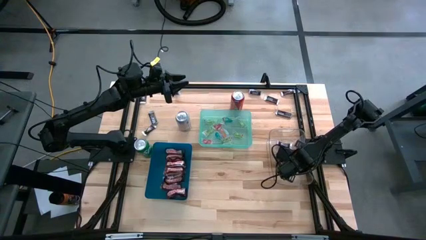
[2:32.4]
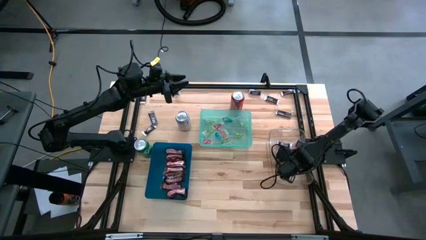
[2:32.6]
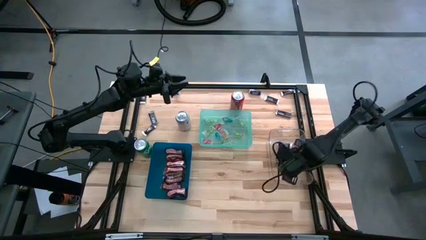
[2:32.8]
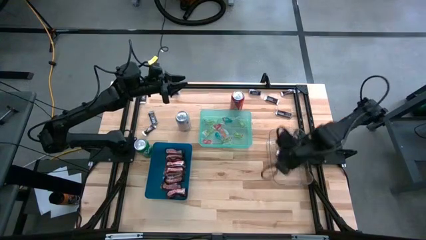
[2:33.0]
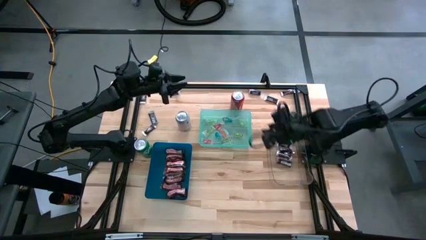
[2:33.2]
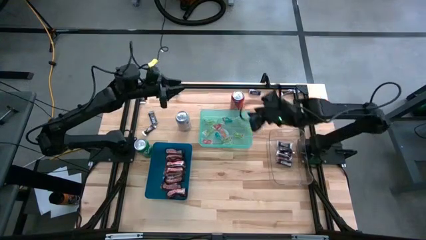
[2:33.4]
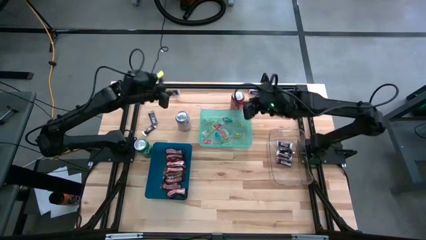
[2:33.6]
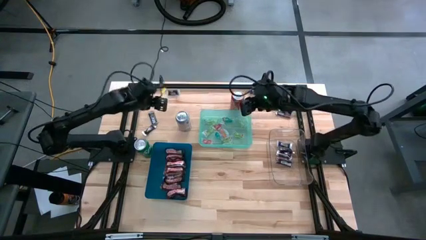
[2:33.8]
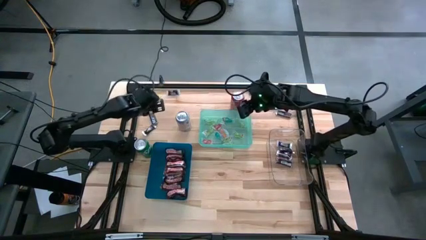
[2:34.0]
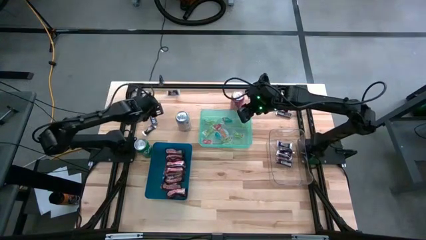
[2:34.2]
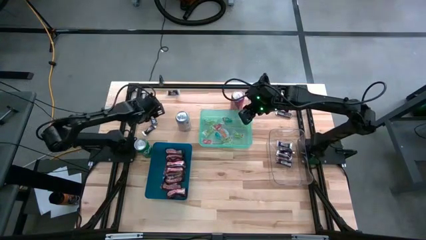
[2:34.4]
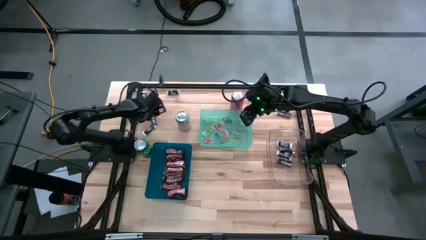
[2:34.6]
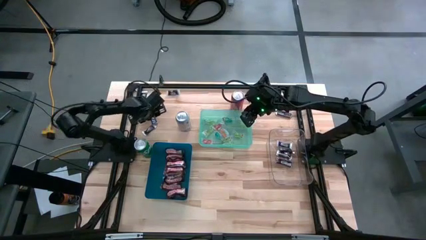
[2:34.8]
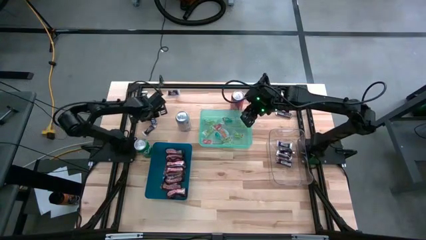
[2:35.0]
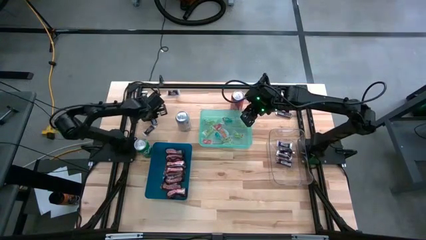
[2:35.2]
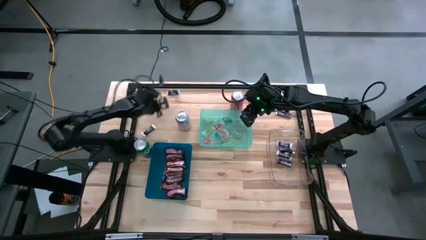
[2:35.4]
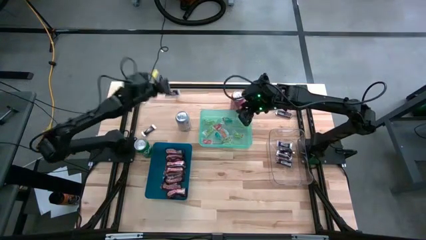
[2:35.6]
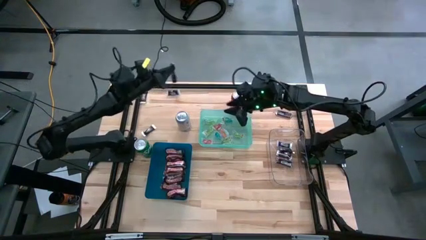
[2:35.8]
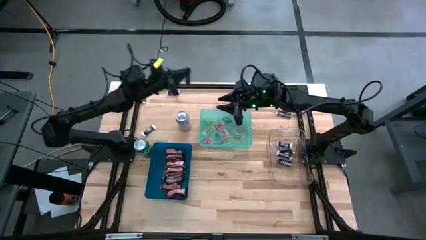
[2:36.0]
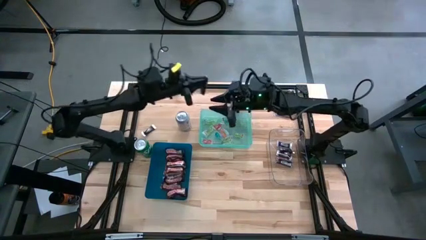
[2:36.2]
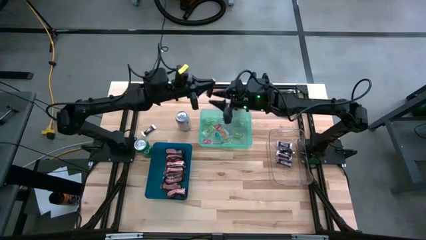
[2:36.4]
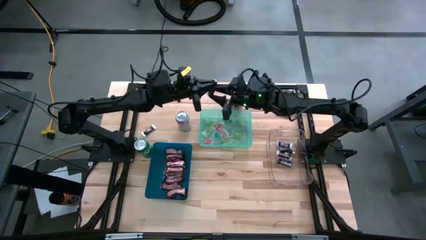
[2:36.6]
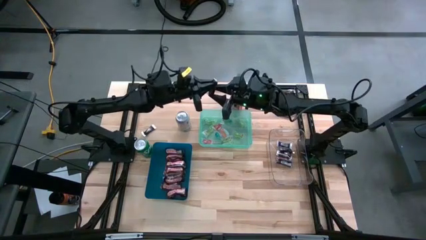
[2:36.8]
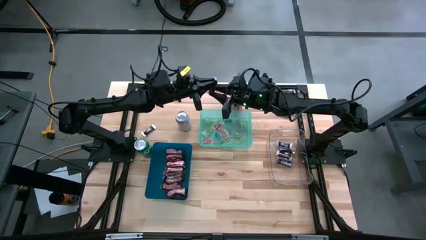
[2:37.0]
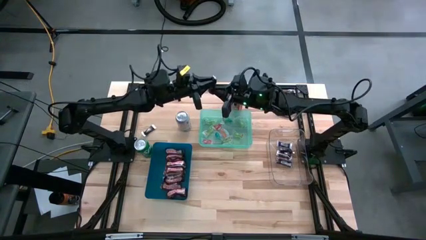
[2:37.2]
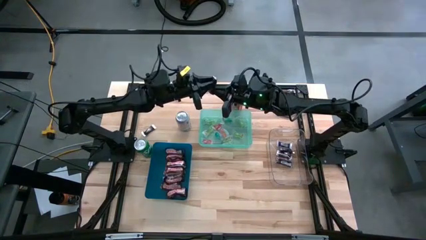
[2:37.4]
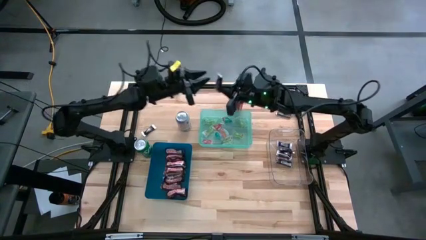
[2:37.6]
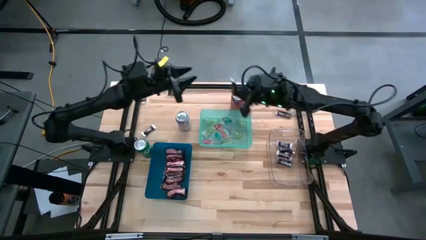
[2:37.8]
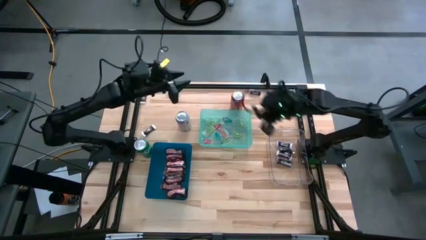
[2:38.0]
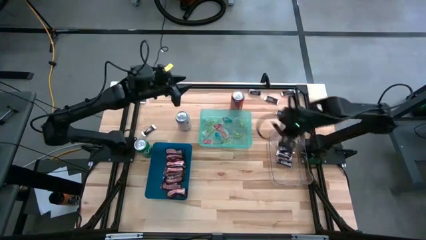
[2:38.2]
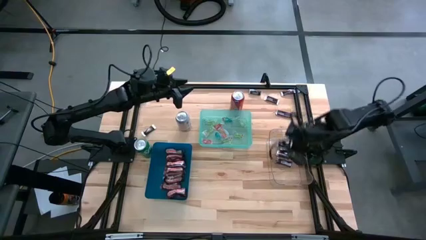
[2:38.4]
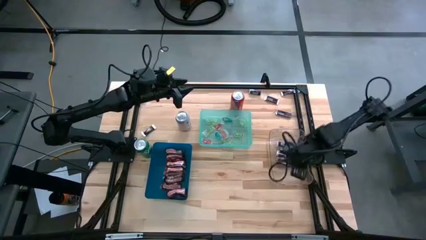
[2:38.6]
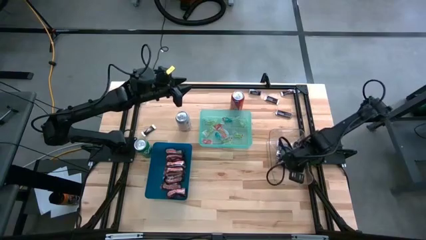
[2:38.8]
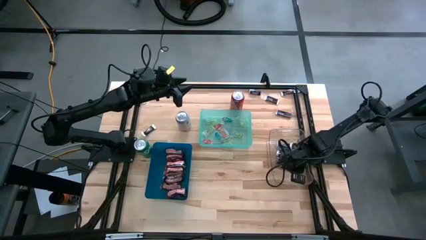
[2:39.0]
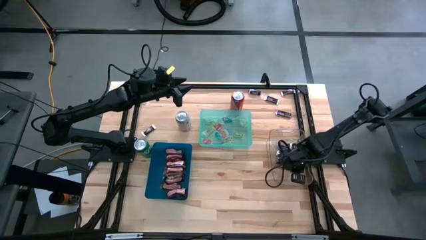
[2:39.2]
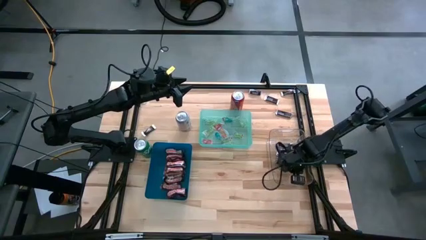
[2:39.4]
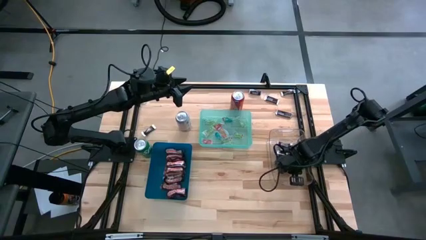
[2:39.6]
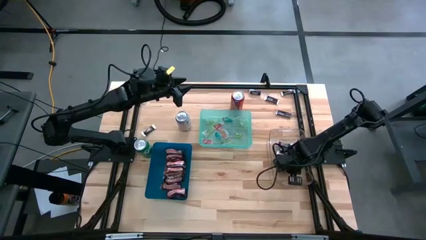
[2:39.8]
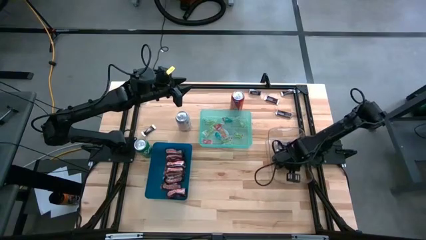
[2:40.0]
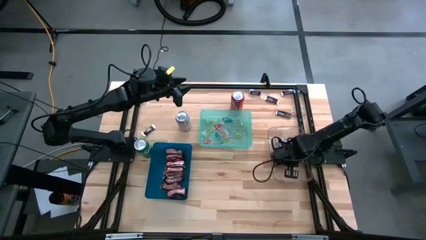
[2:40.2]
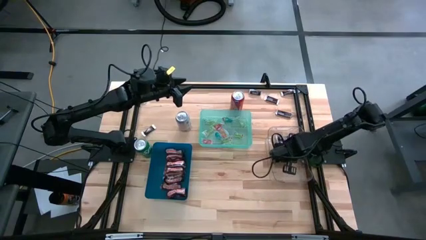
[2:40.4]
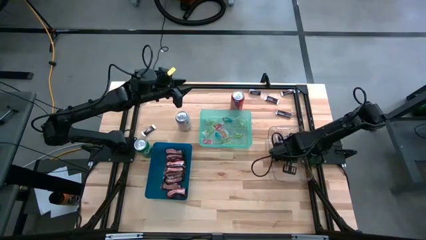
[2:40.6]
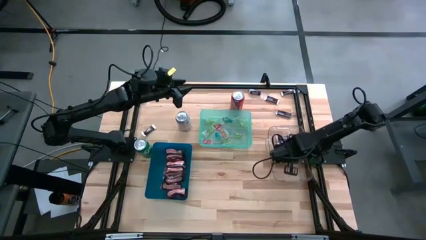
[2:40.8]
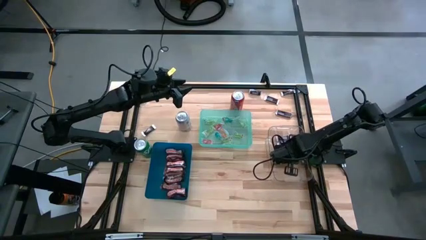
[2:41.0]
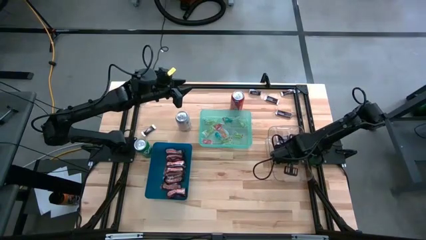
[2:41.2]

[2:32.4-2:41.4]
Task: Organize candy in baskets
Put the white brown chocolate into the transparent bin

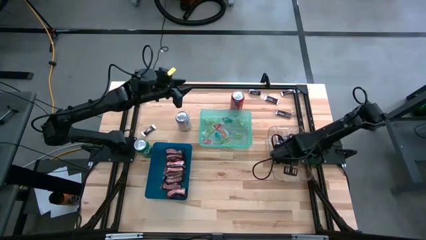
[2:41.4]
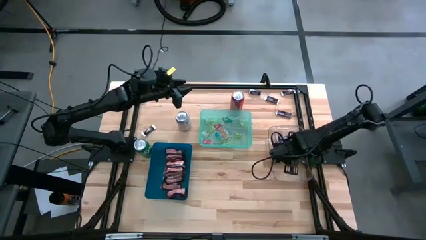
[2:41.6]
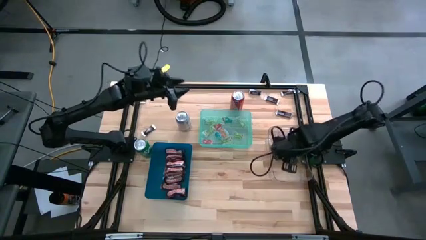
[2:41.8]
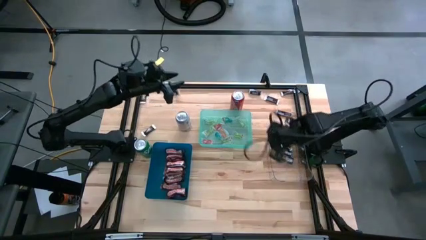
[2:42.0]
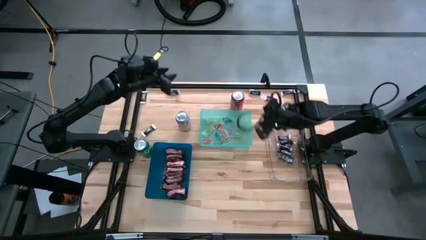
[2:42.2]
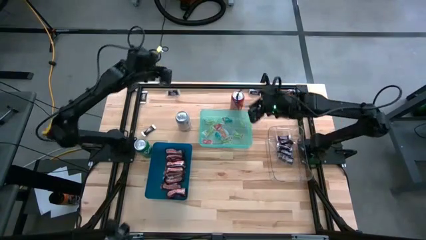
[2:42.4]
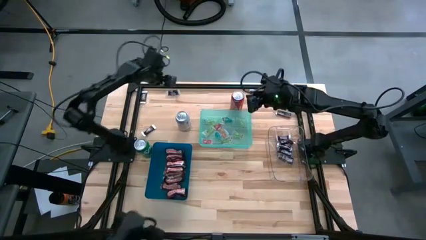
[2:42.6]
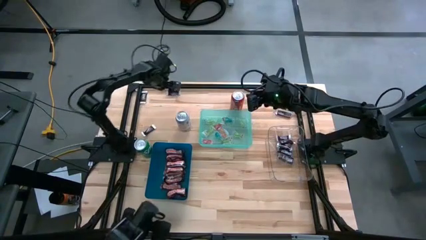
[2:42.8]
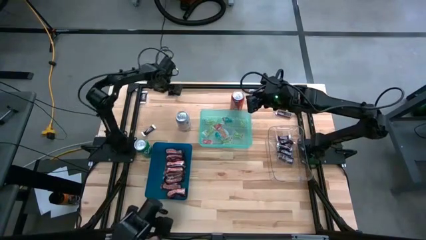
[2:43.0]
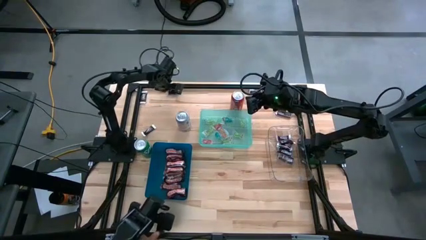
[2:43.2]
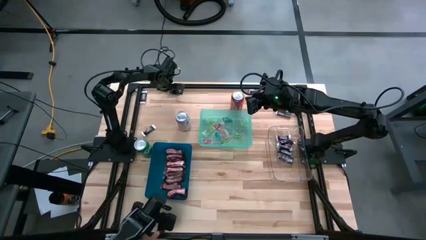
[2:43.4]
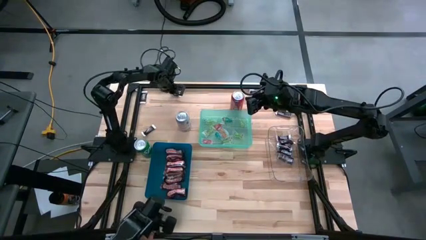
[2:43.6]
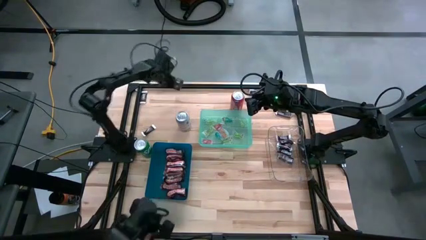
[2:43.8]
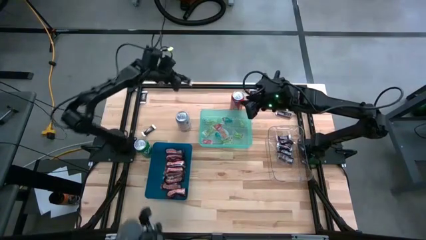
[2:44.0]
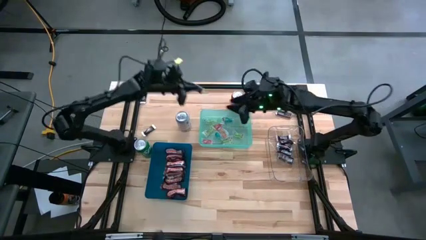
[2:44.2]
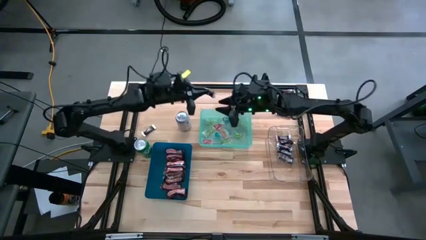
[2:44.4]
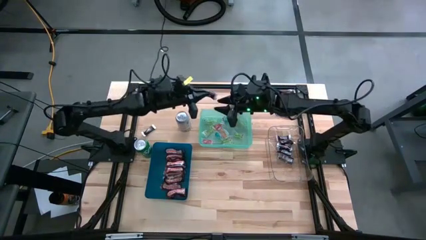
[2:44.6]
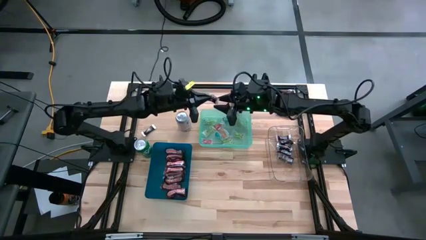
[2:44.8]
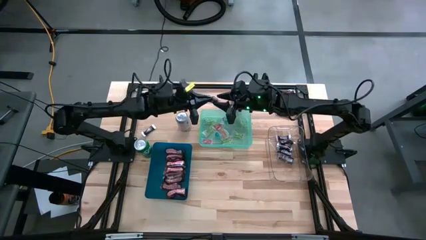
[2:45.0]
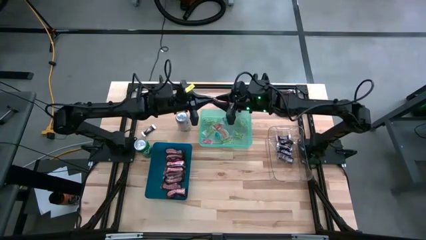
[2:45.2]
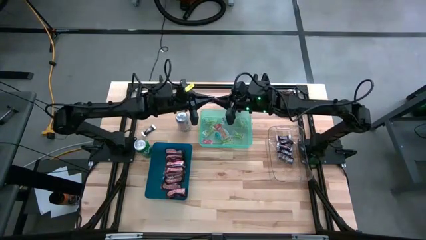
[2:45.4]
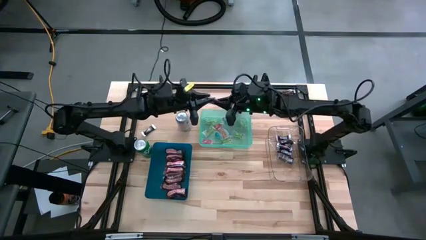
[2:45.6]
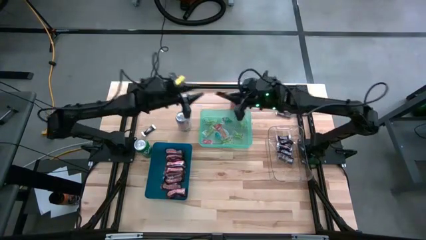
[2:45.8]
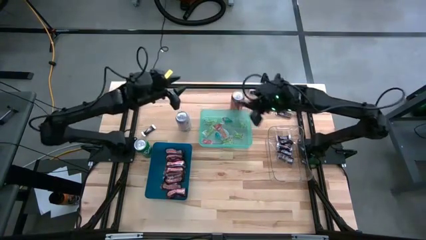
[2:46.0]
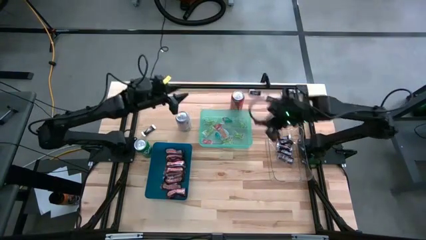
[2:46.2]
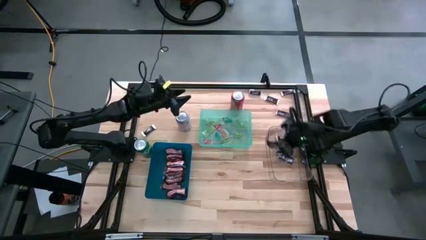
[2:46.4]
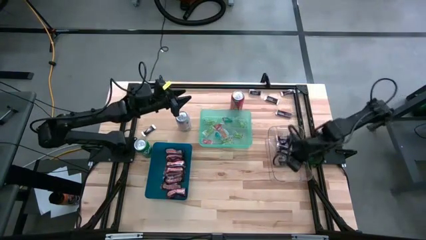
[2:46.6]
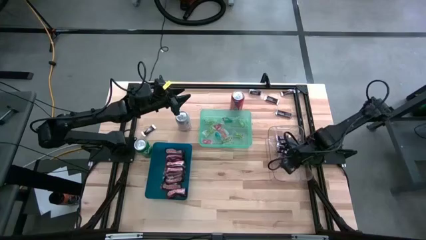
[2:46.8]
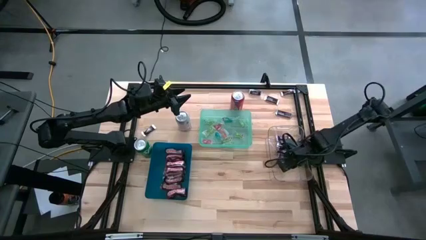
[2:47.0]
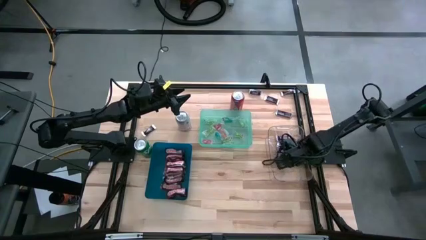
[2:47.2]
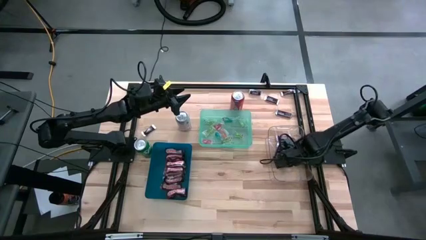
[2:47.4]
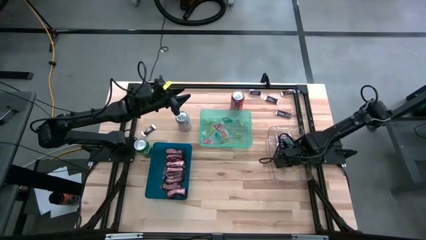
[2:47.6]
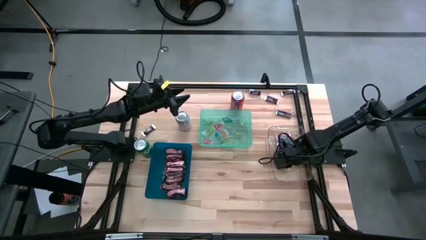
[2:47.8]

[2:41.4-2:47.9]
Put the white brown chocolate into the transparent bin
